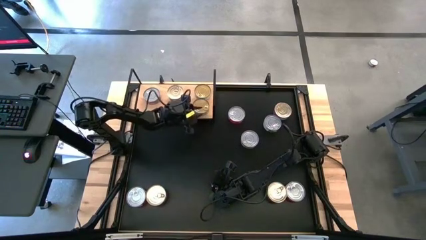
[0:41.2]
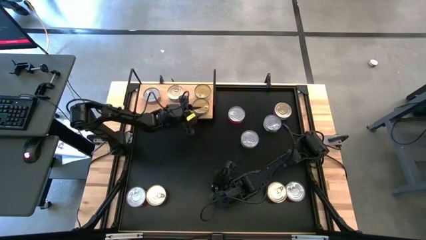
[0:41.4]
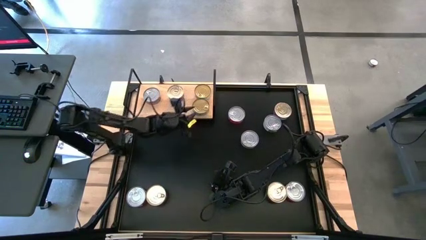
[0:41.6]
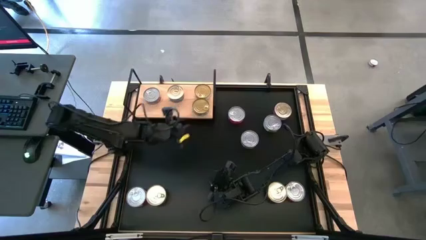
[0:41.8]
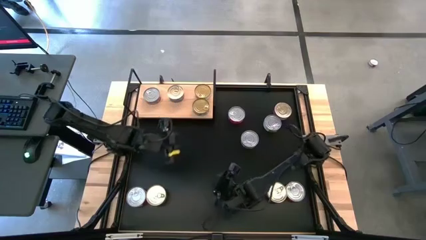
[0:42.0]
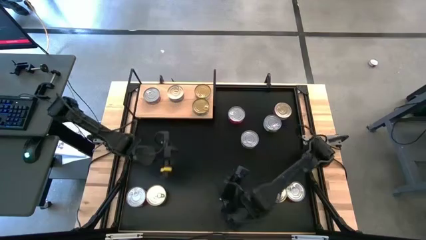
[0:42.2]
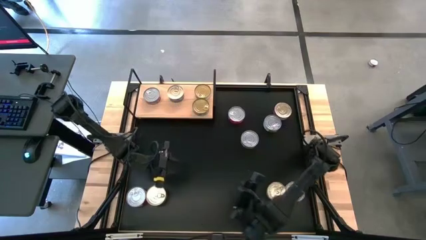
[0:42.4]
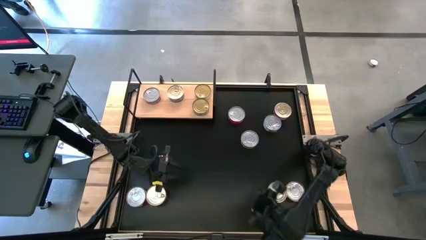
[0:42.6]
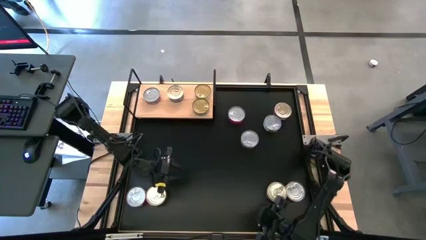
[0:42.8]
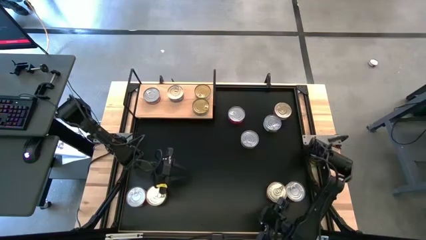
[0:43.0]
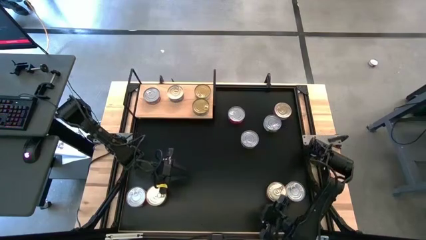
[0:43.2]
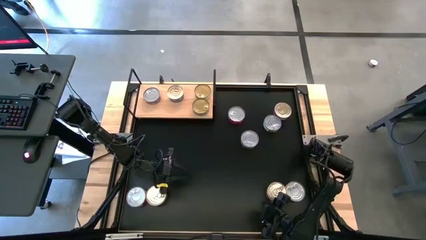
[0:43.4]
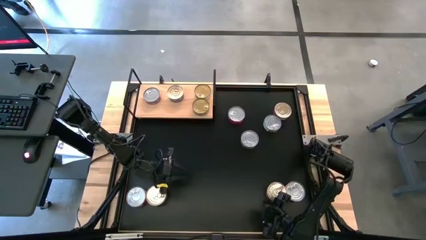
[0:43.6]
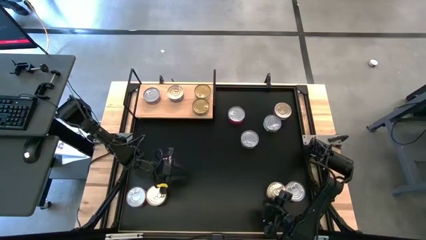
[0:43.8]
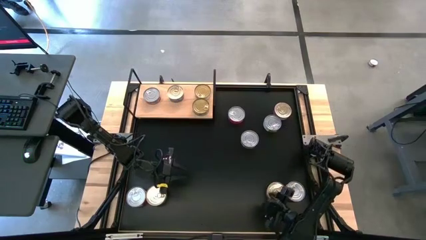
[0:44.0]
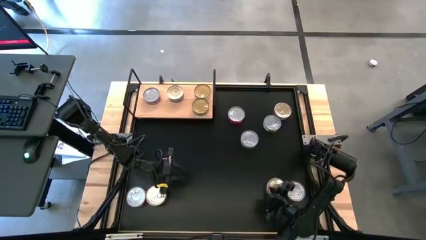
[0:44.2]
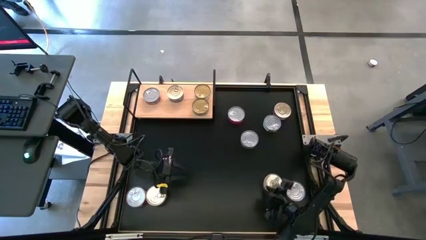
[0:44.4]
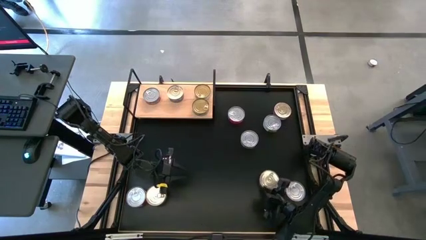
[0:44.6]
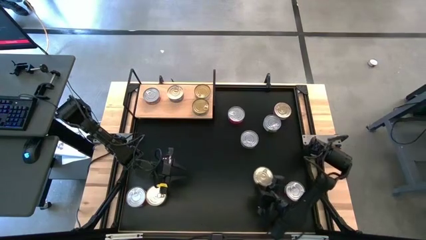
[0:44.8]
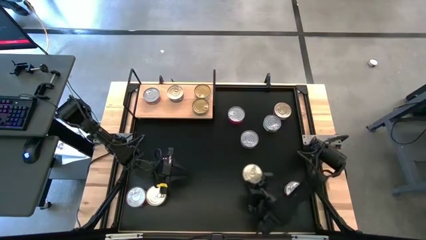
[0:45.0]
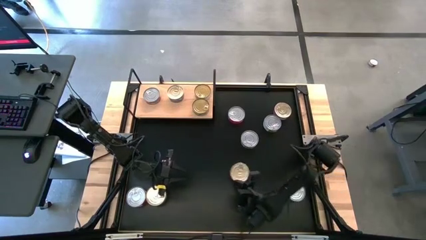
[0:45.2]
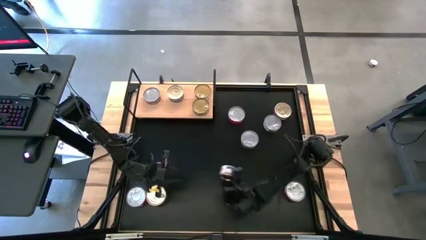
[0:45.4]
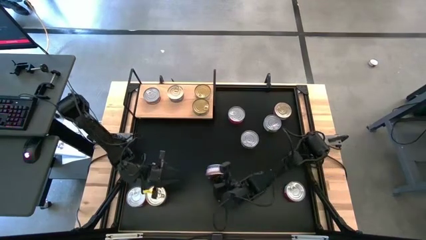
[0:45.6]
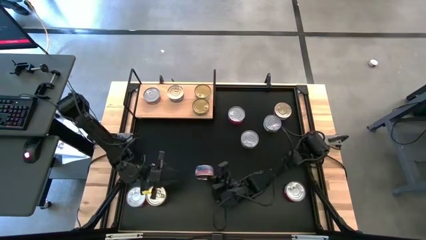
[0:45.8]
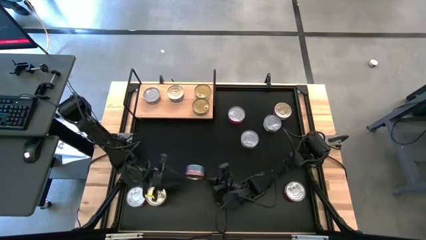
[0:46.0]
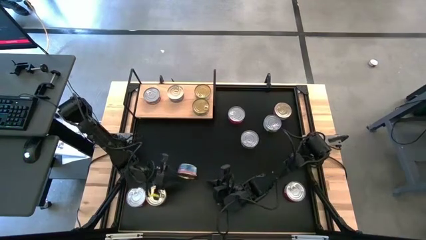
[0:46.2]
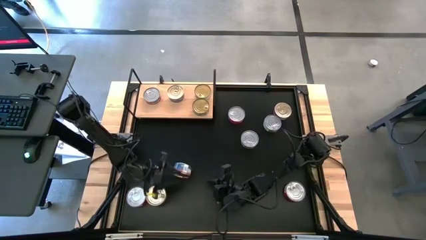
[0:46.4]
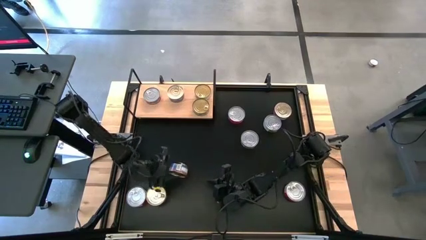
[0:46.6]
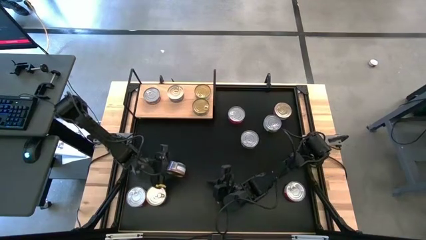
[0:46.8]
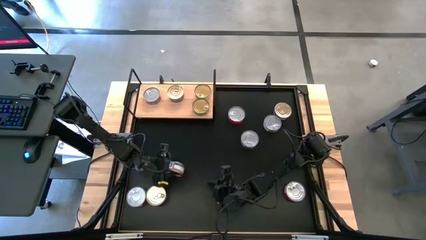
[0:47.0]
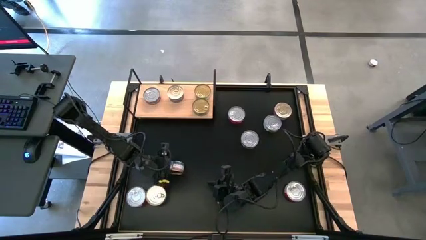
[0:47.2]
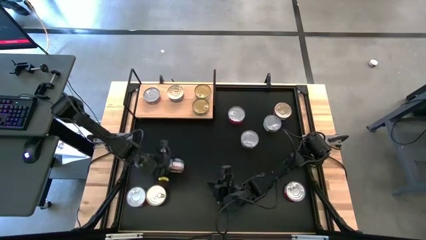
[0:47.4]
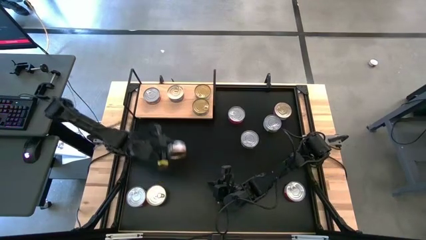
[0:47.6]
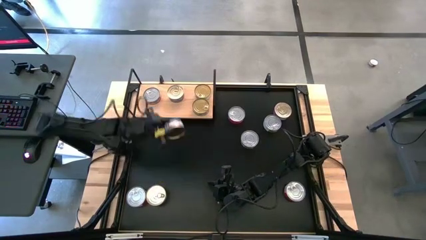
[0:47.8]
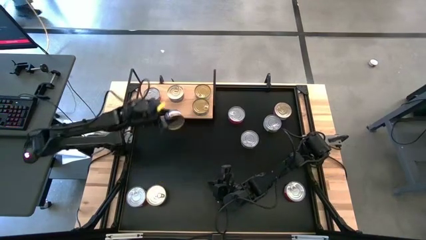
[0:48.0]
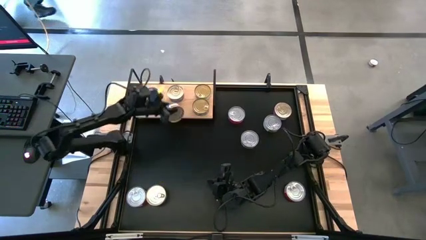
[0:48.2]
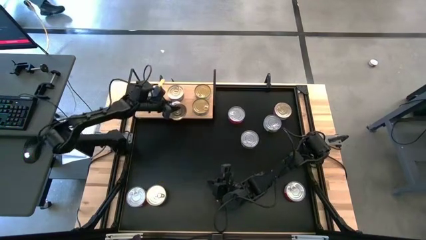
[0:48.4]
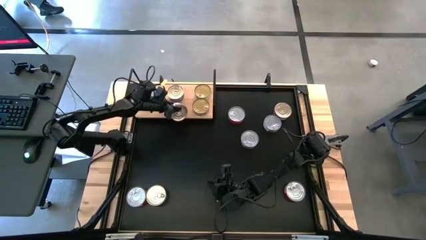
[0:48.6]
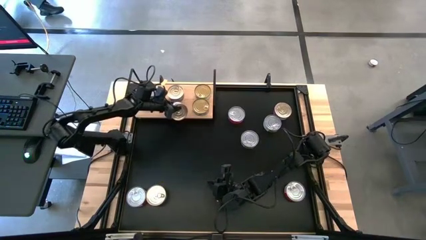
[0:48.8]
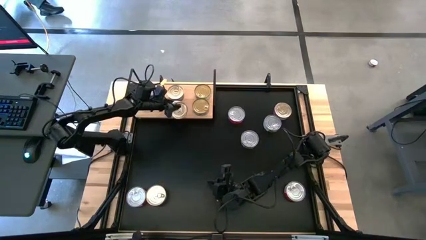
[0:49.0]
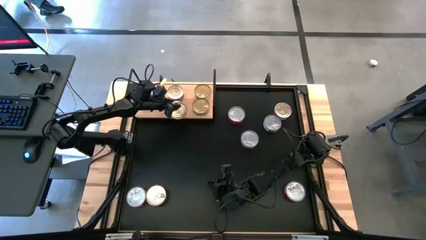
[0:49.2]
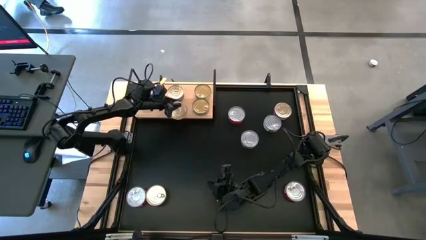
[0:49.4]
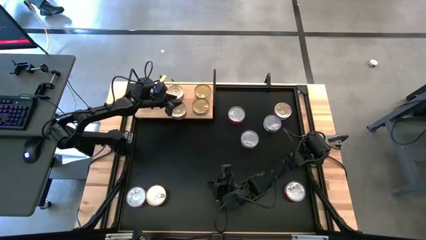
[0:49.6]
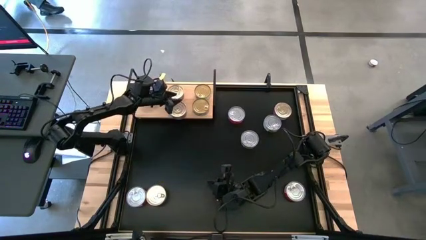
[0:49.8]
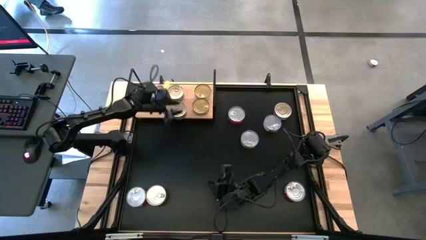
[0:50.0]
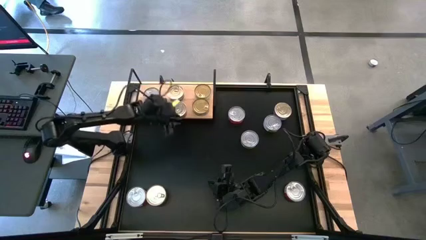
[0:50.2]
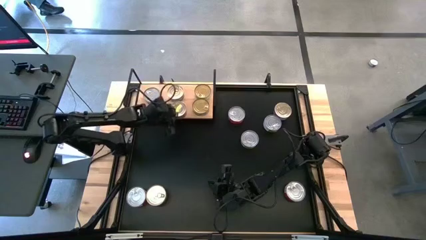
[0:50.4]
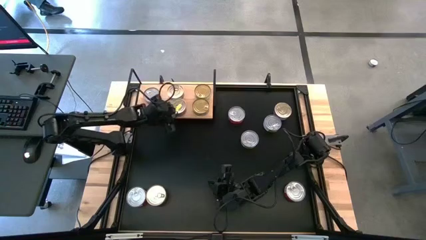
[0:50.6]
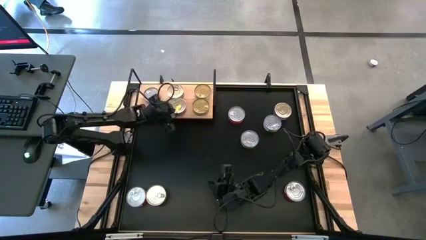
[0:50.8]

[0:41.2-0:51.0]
Task: Stack canned seafood by type on shelf
Put the pink blue tuna can on the shelf aligned with the other pink blue tuna can

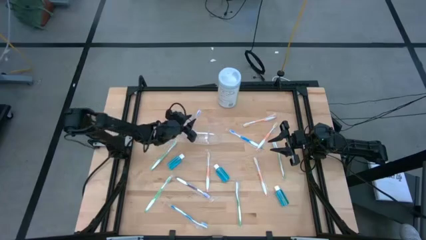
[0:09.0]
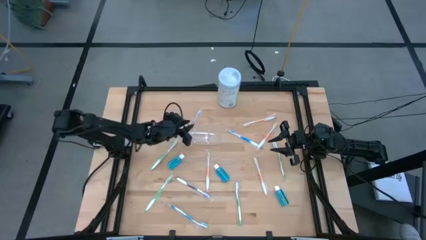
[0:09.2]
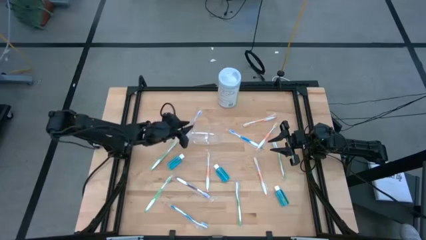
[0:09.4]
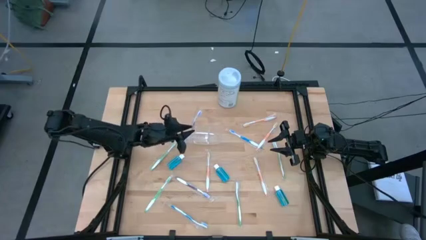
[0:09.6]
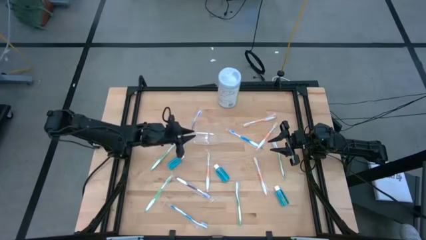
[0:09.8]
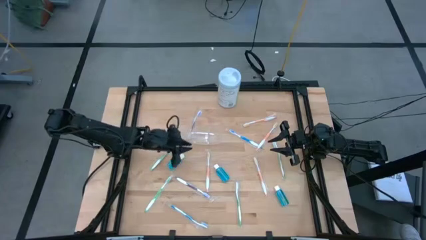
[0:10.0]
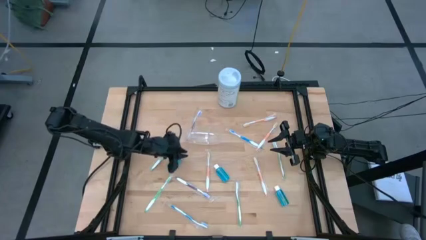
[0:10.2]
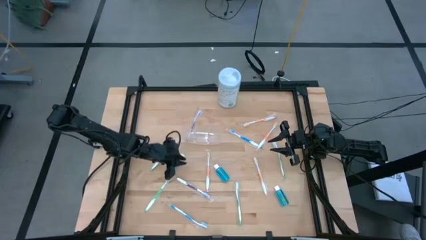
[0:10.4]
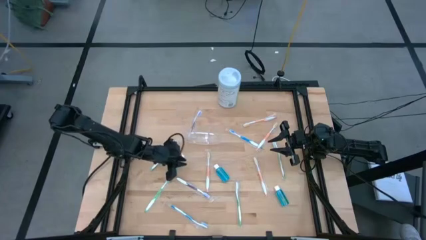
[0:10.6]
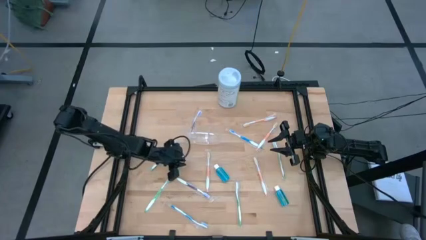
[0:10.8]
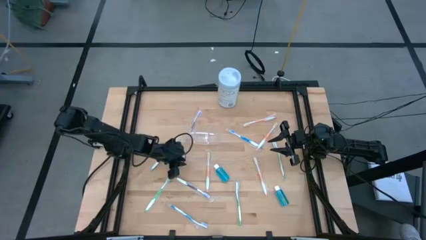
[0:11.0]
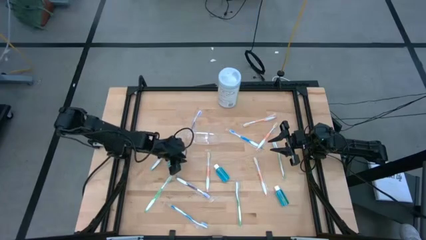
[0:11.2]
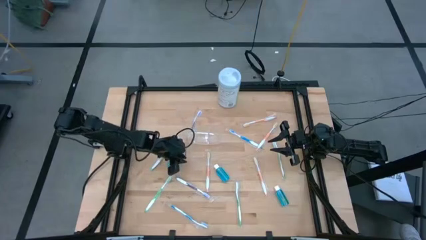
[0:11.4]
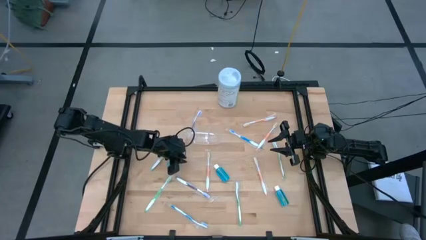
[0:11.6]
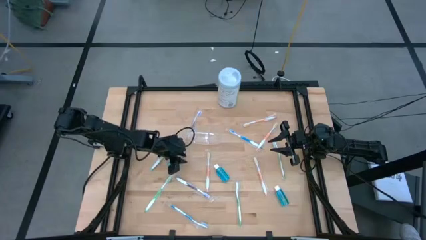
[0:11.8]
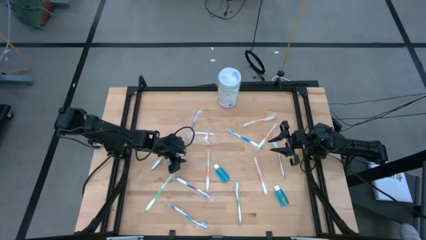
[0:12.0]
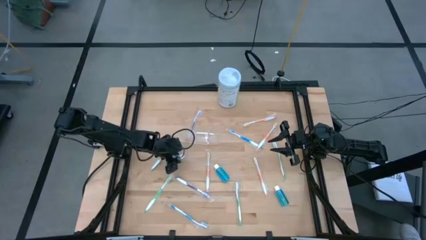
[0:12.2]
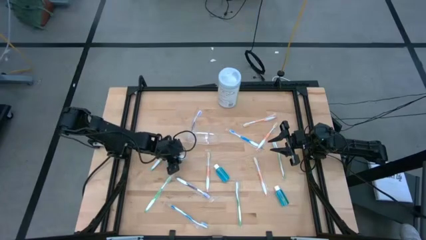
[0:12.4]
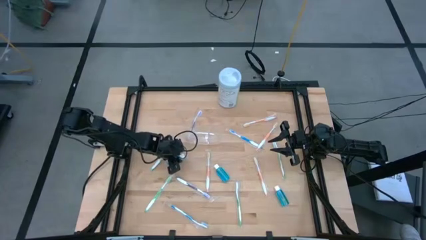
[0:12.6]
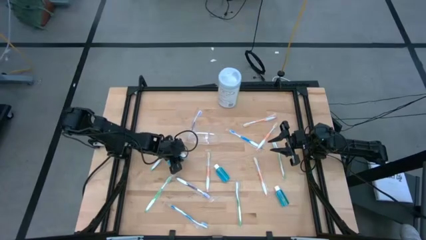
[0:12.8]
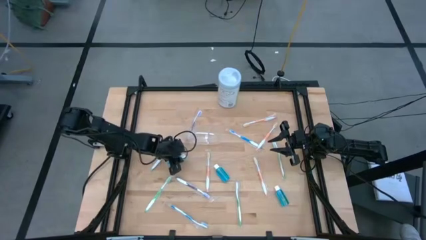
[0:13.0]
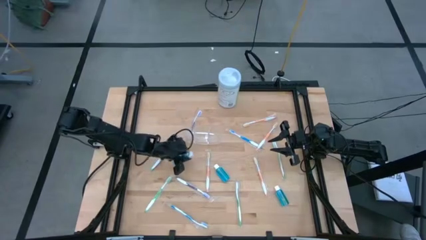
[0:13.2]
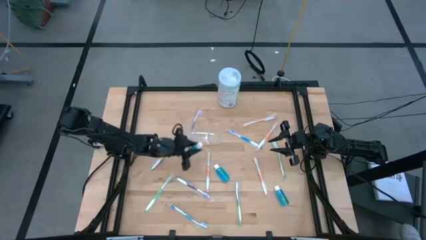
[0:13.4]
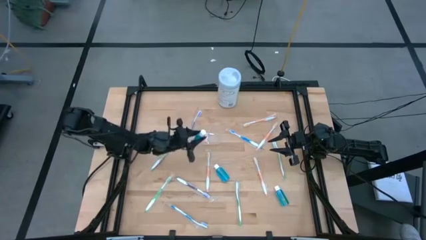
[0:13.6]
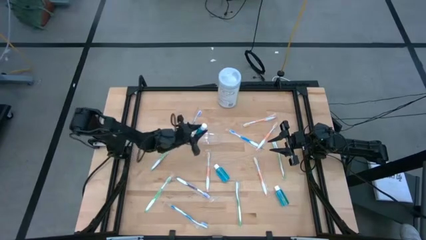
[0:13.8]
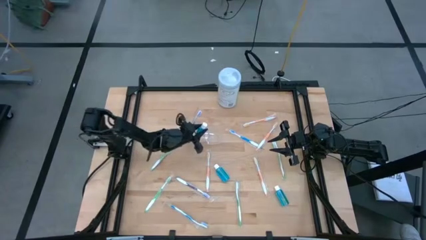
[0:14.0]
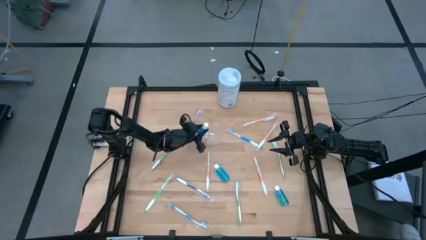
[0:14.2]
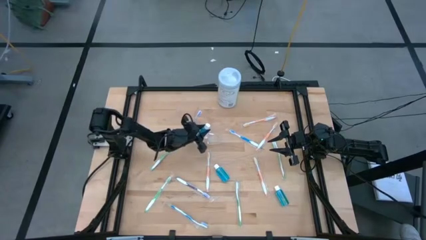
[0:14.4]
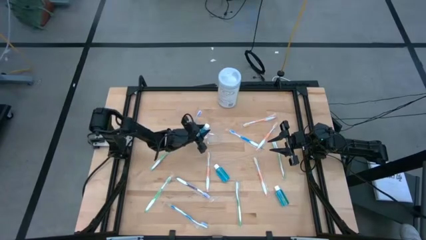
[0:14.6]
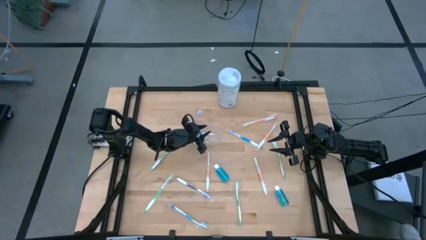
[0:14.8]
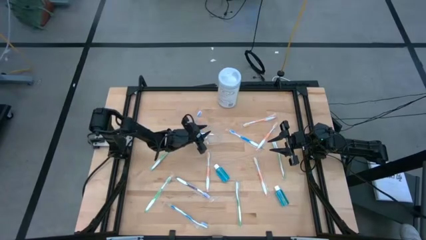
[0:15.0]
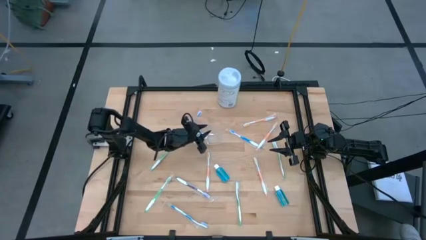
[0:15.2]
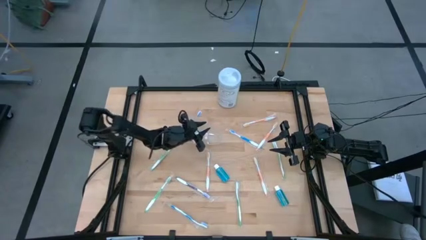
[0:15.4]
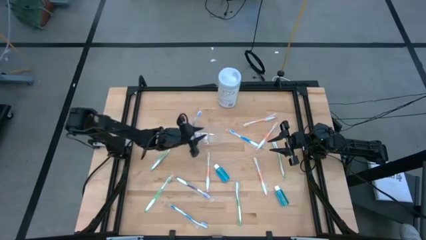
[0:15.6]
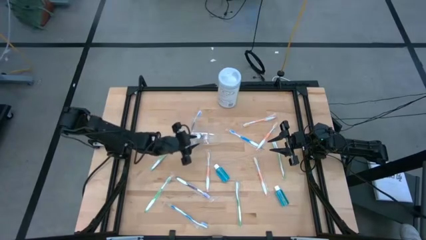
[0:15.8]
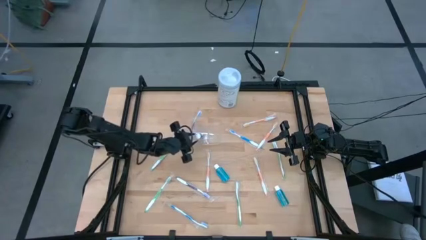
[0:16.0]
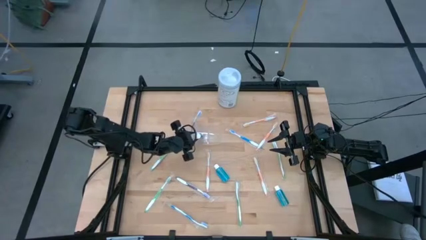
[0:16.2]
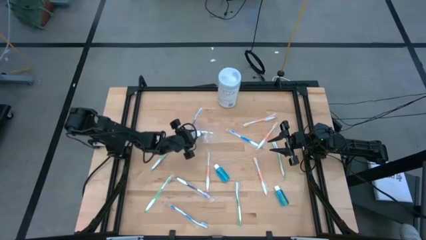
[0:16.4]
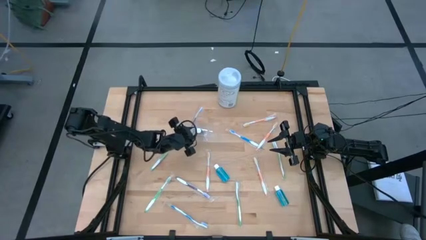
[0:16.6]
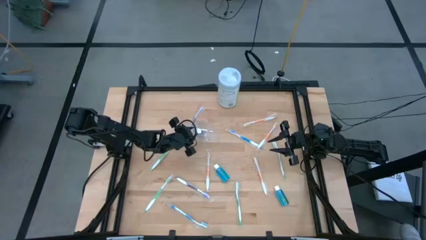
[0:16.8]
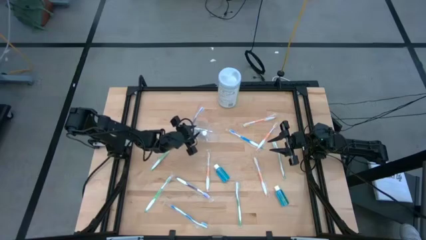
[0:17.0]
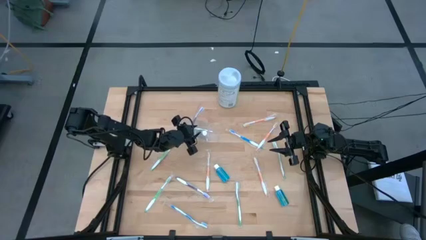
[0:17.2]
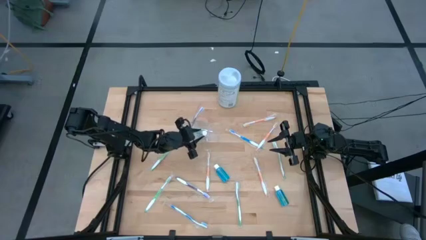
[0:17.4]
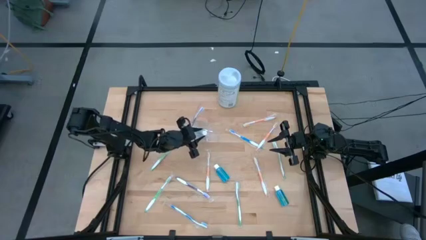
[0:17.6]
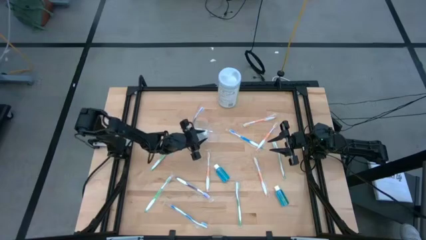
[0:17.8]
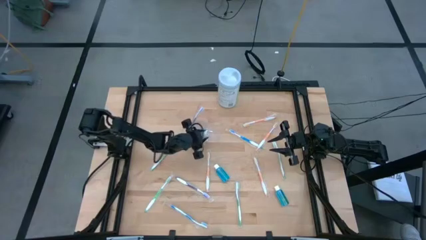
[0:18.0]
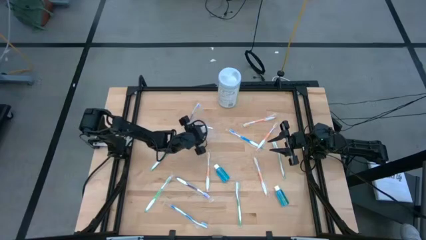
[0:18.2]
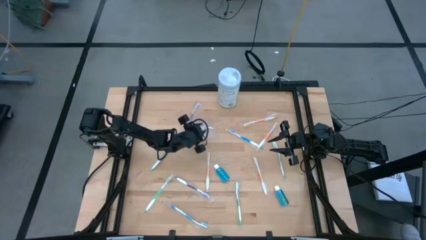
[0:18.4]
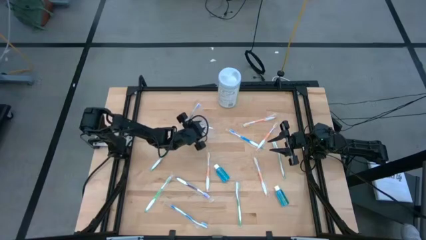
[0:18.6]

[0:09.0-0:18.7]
Task: Pick & Place toothbrushing station
Put the blue mouthwash into the transparent organizer
